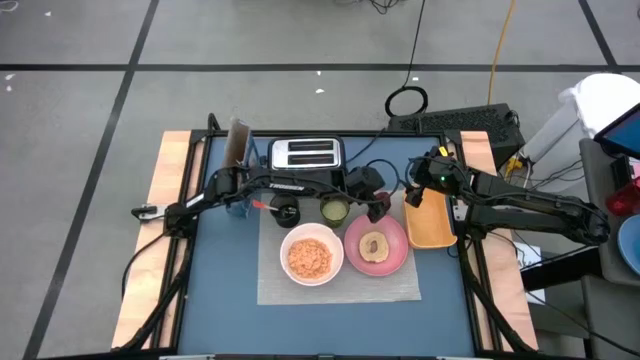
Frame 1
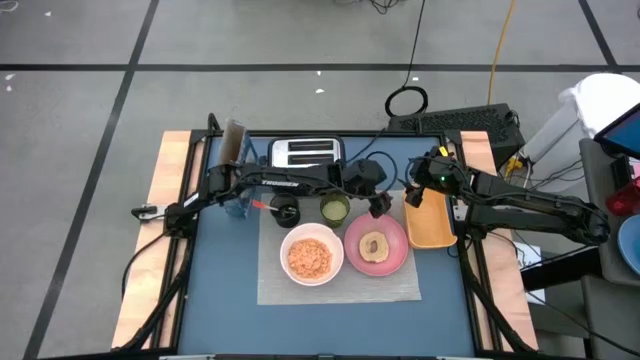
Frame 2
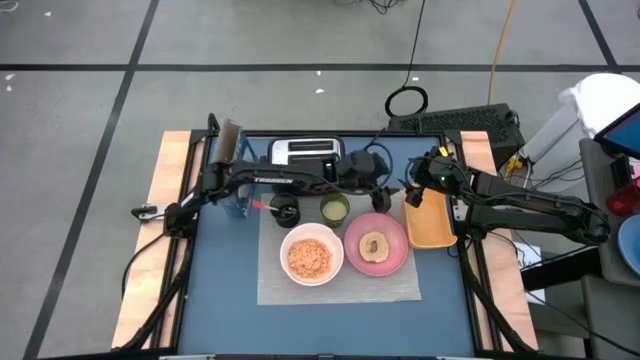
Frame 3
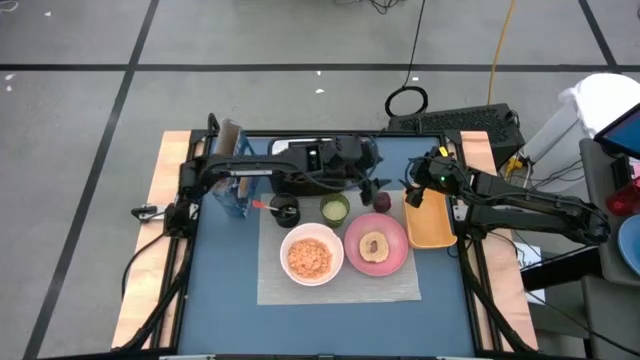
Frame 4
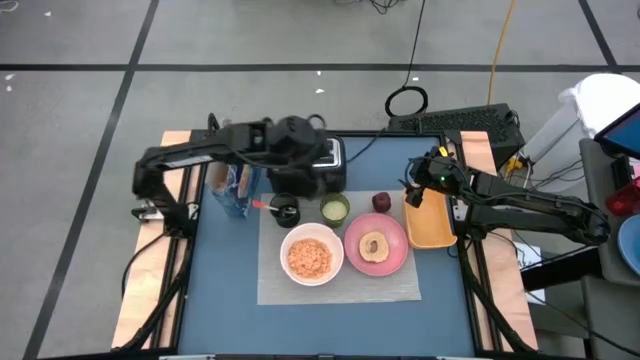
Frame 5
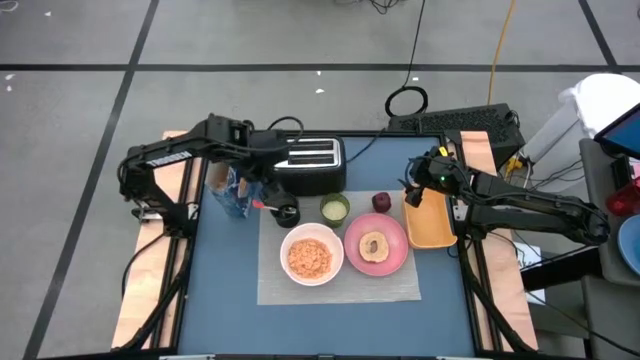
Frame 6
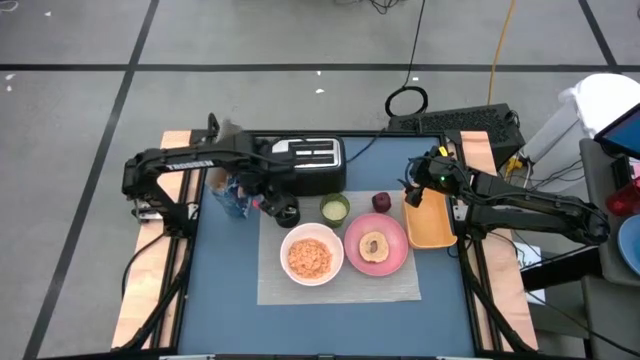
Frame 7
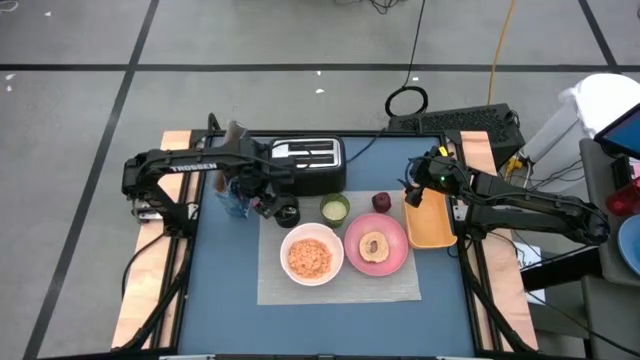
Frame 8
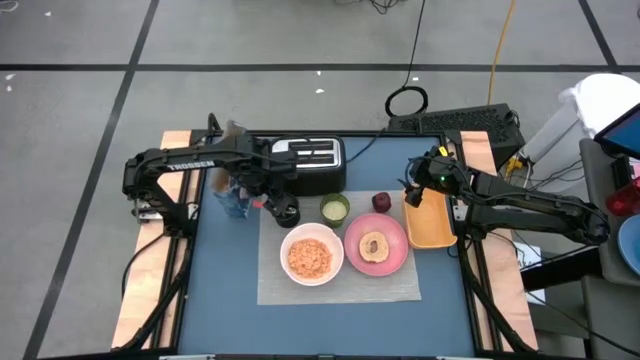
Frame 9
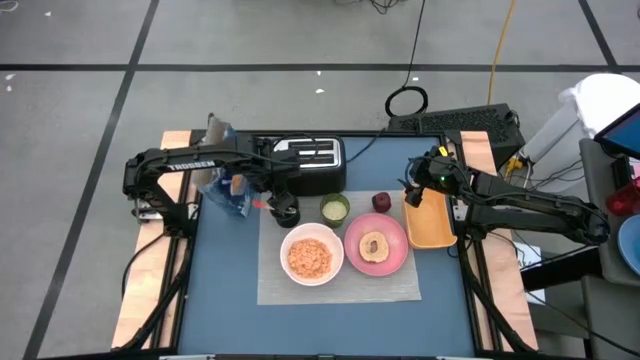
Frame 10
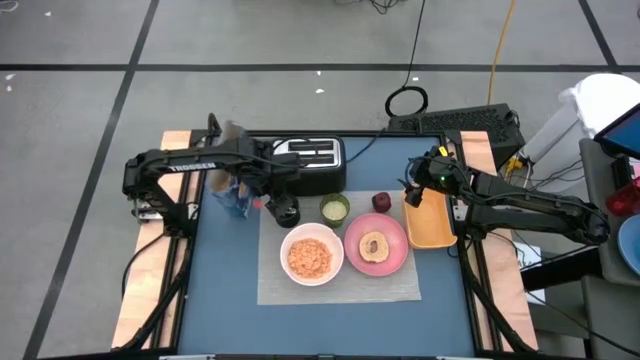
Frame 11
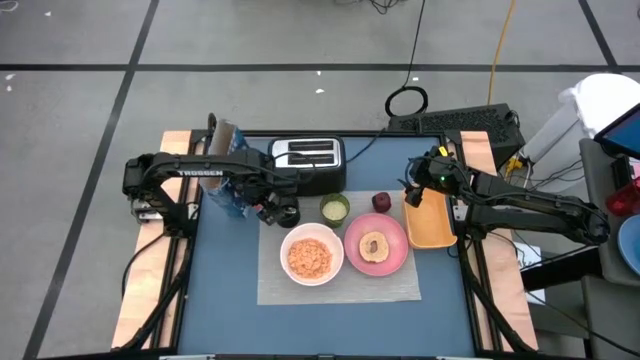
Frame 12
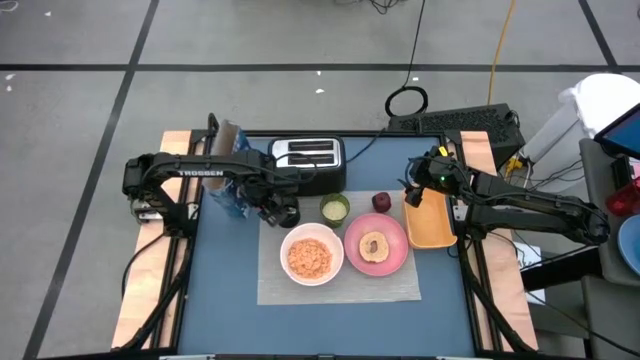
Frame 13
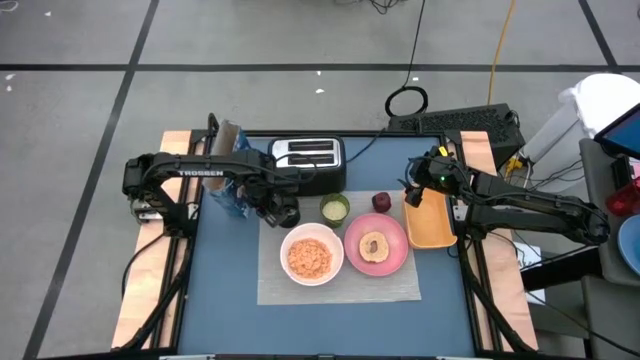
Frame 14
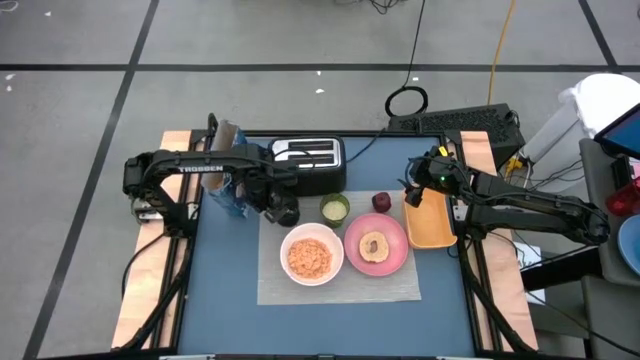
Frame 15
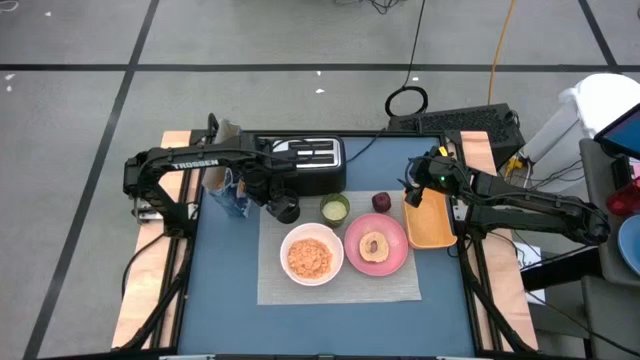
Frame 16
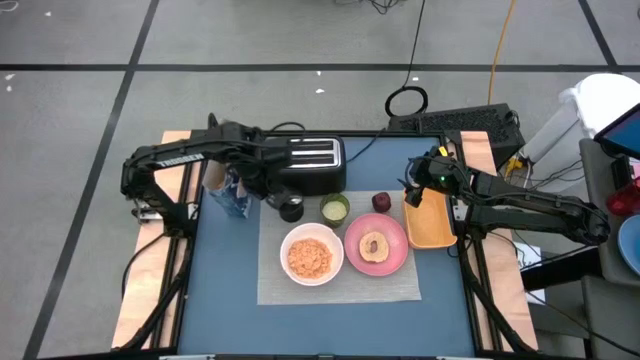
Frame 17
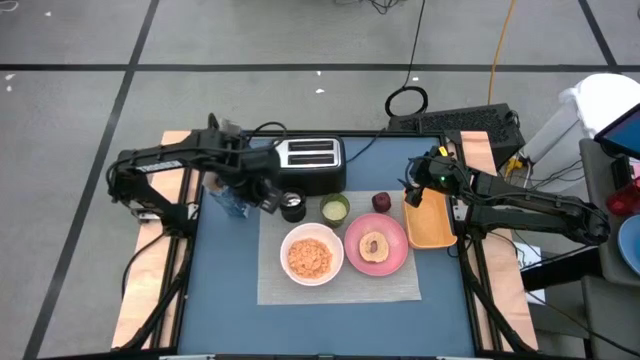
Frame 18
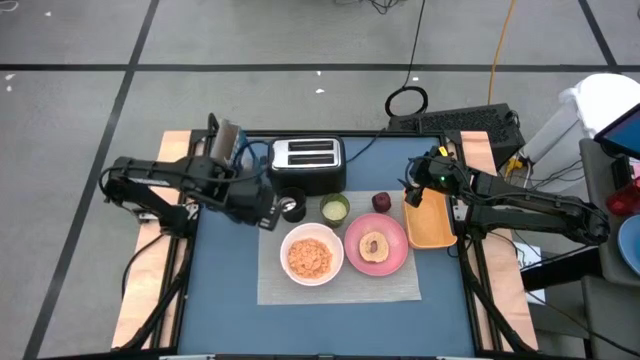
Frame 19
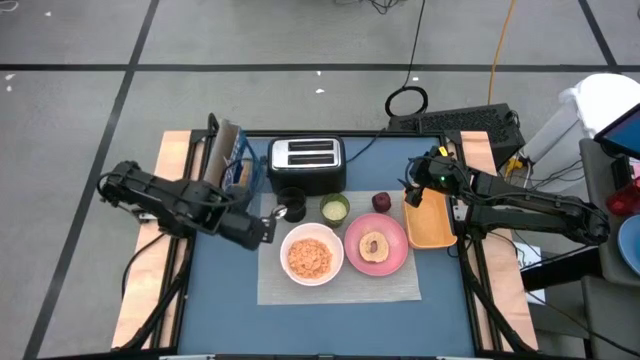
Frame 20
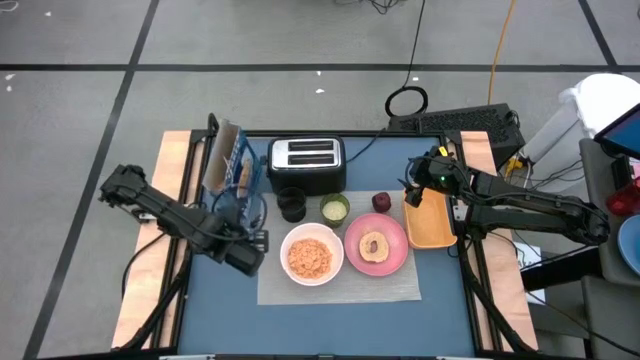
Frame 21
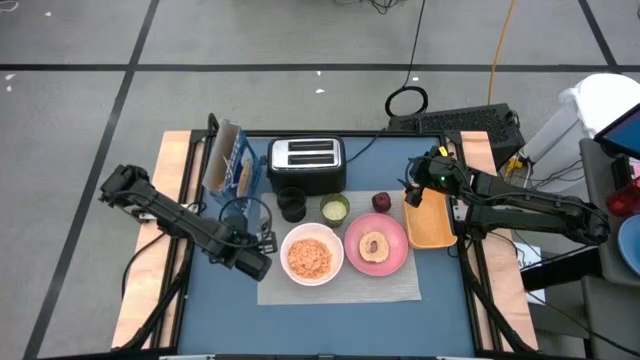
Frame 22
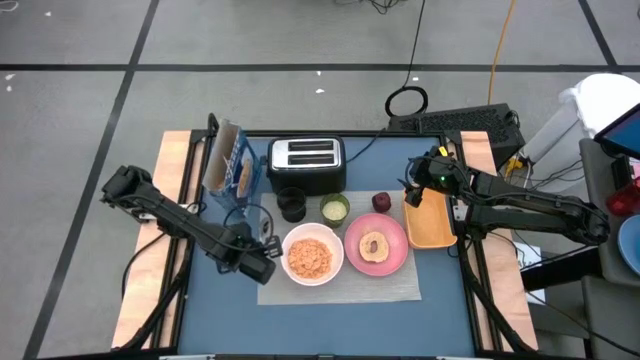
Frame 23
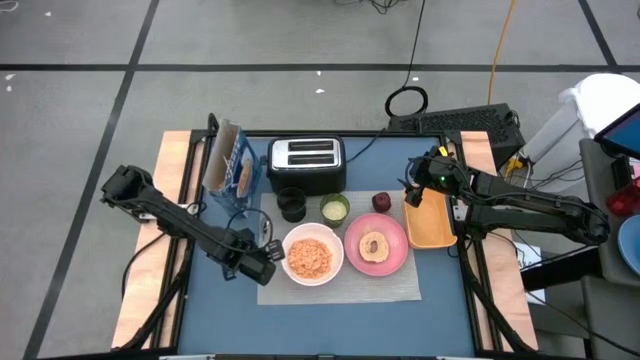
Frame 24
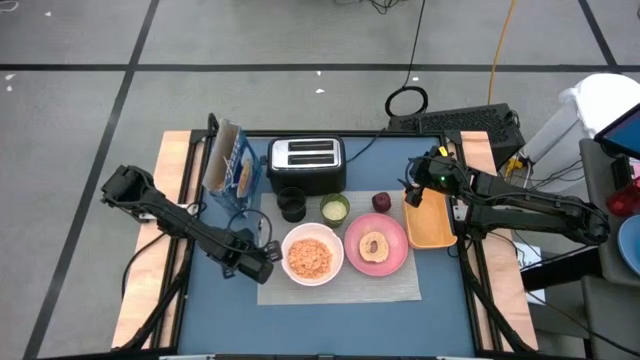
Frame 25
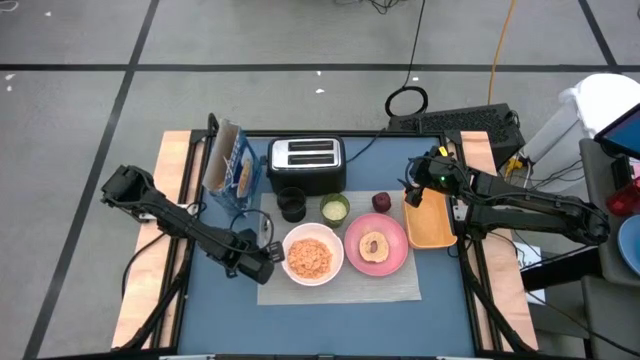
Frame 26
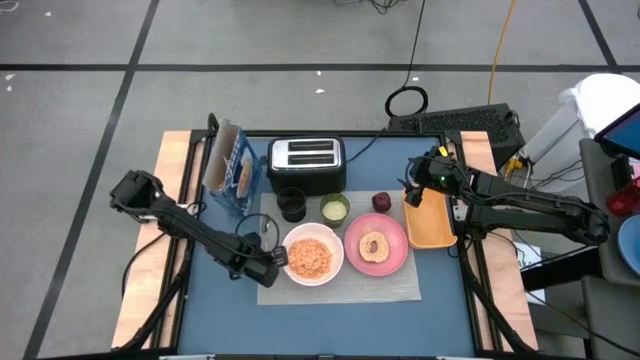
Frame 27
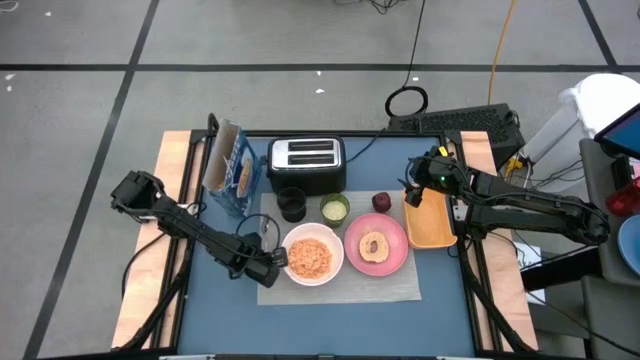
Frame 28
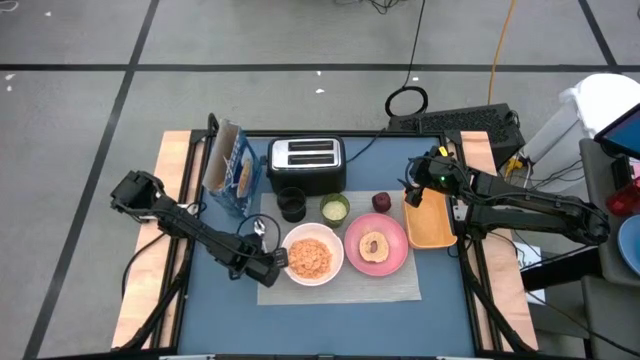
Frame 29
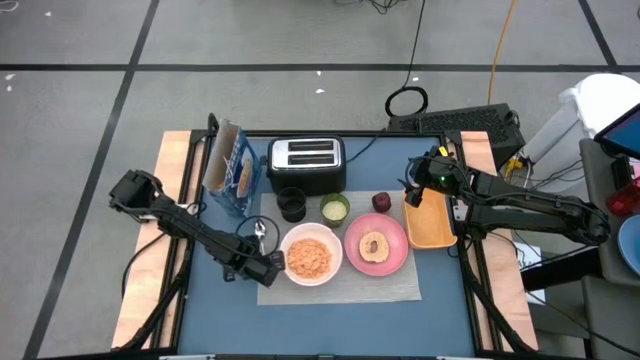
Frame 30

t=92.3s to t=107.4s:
Task: Arrange a breakfast setting
Put the orange spoon on the left of the gray mat

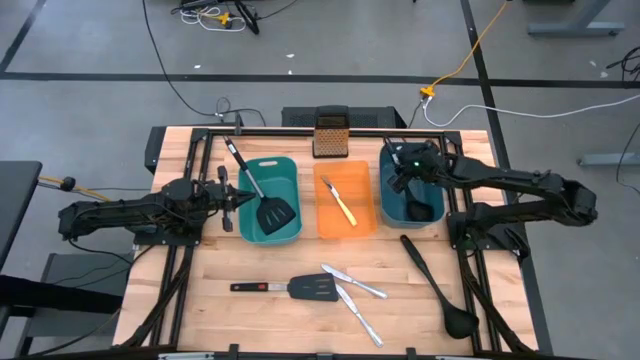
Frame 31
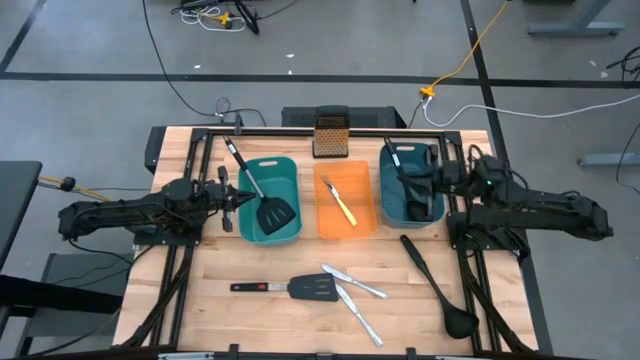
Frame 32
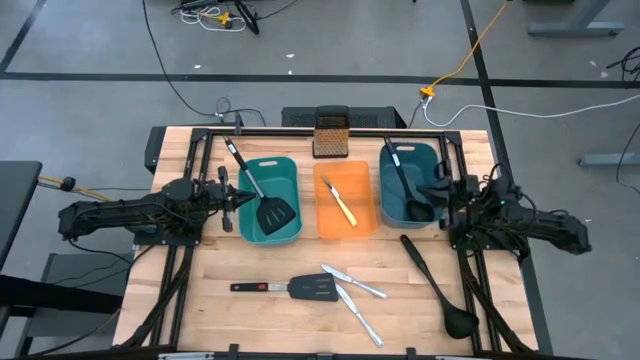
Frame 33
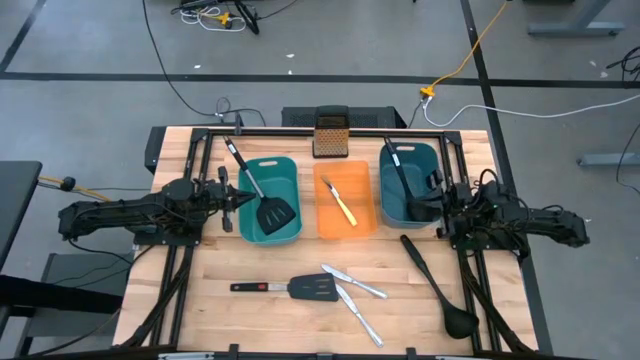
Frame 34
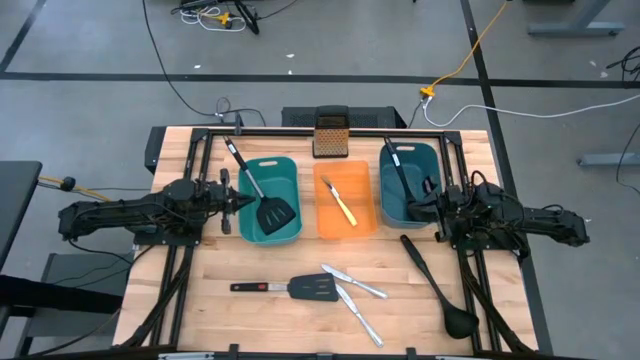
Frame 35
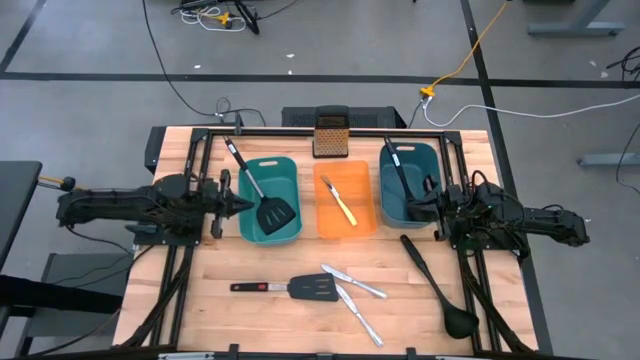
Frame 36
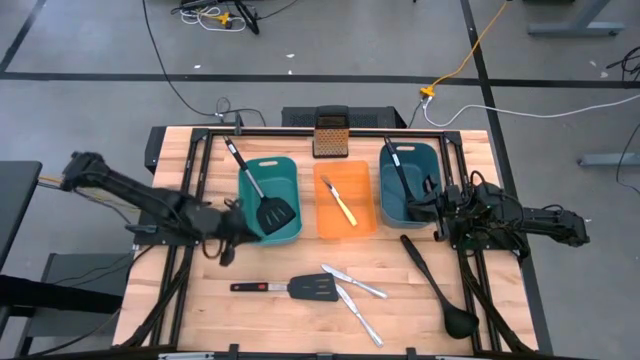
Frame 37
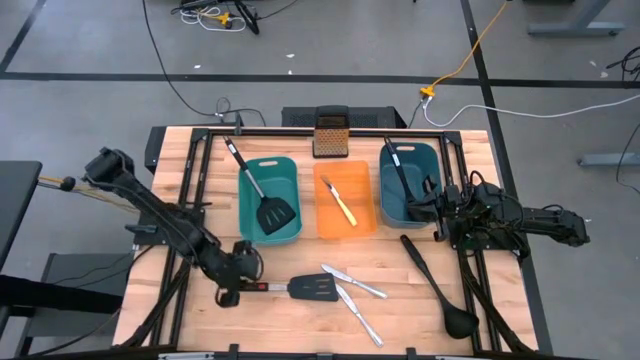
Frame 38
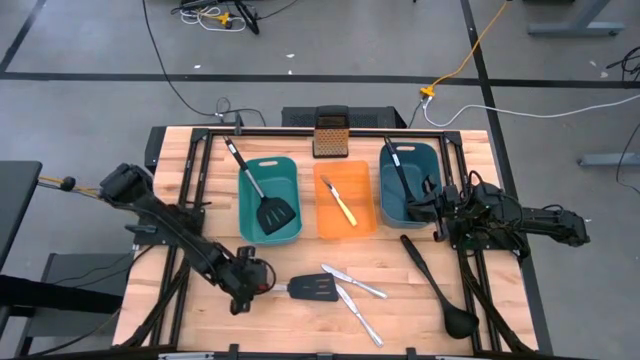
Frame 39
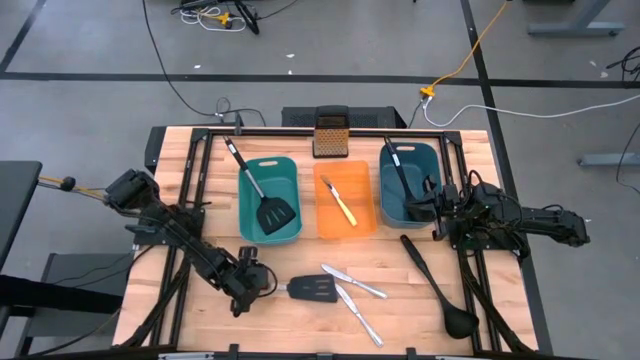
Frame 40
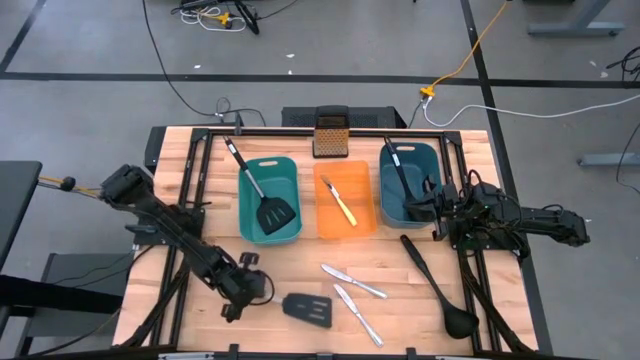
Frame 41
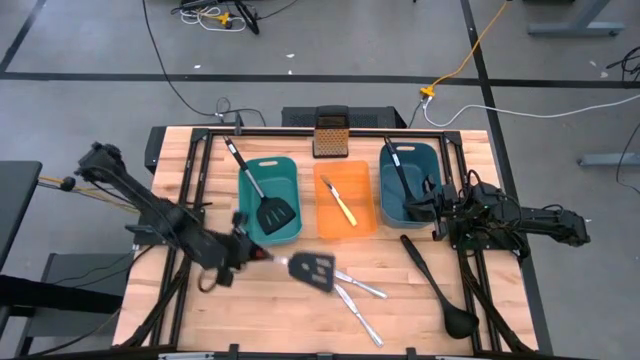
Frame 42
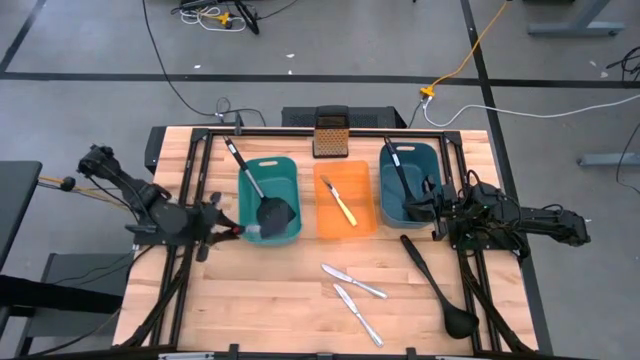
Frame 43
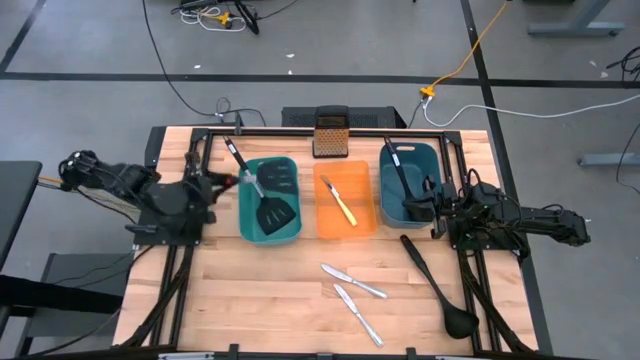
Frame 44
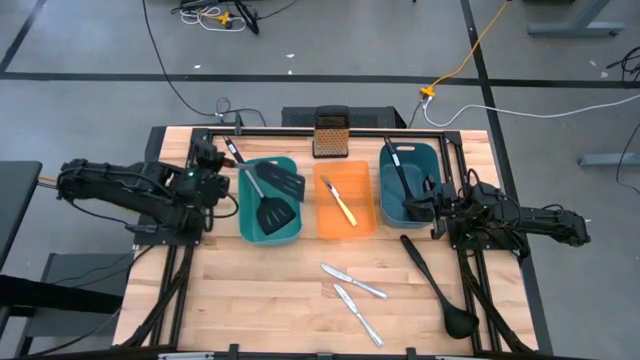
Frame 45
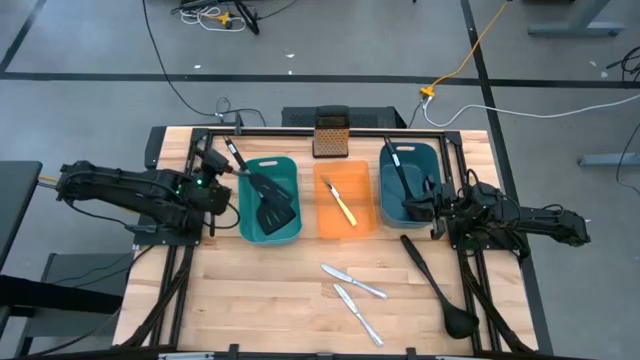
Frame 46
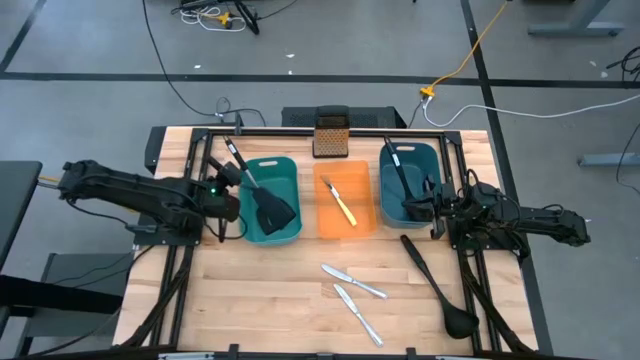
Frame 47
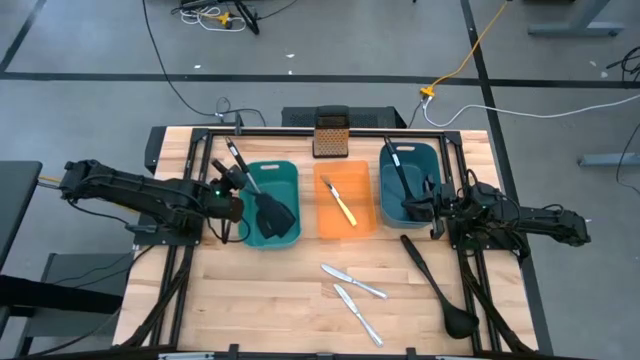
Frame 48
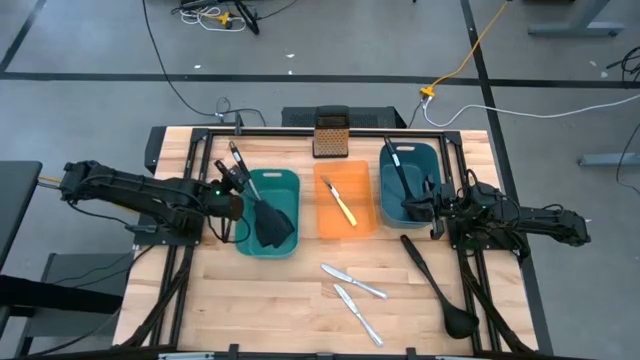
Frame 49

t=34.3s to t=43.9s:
Task: Pick & Place Kitchen Items
Put the black spatula into the green bin
